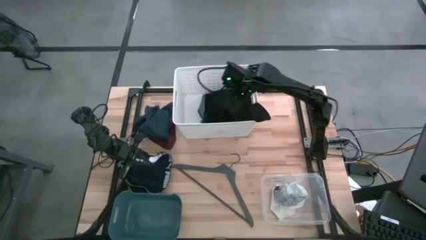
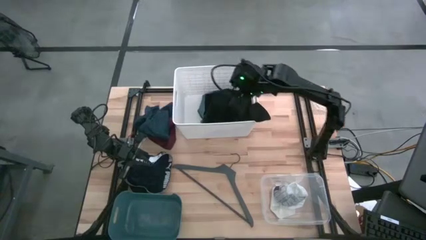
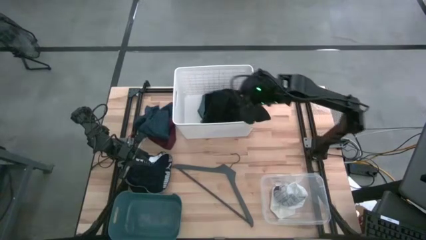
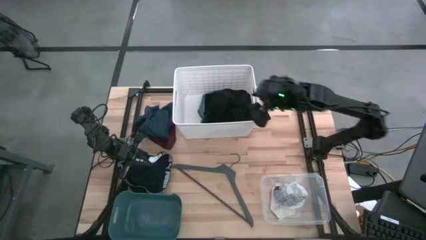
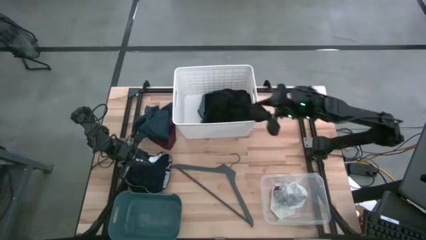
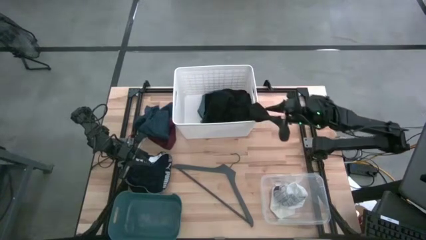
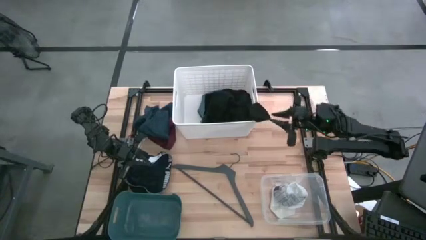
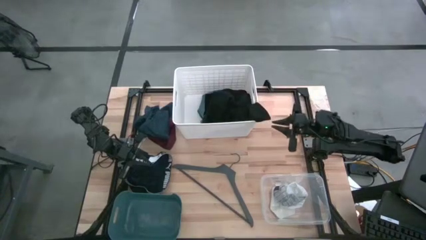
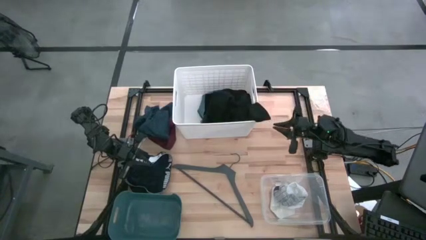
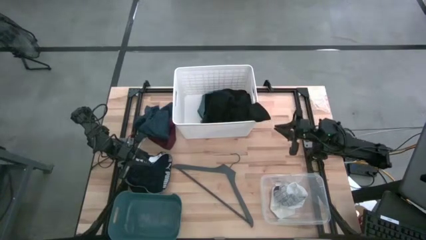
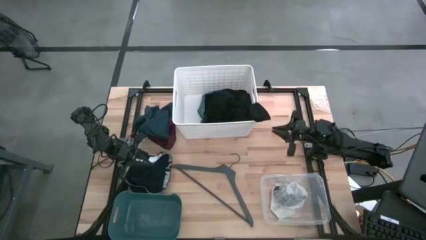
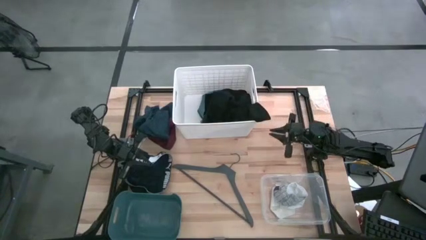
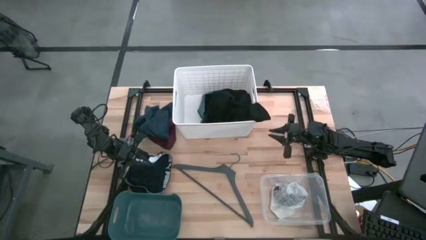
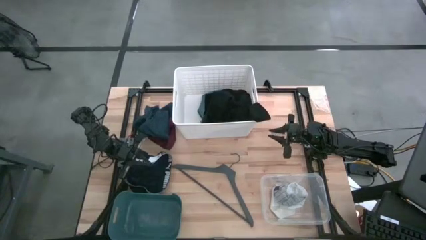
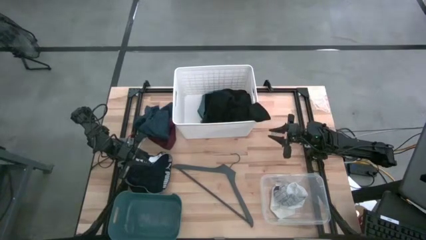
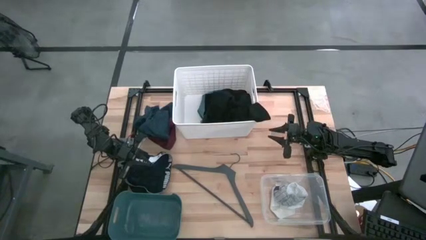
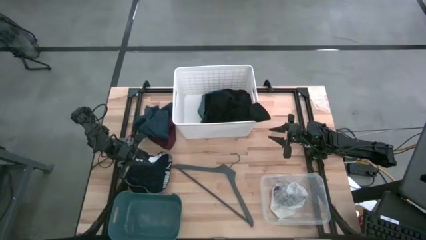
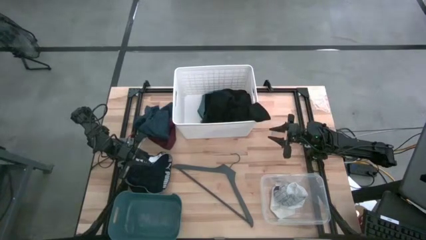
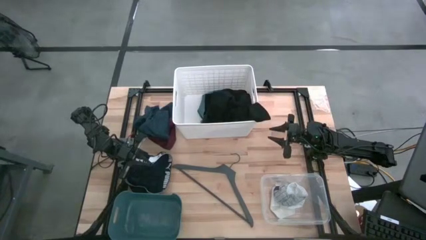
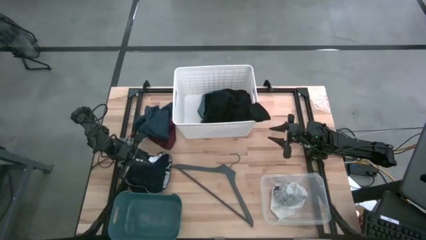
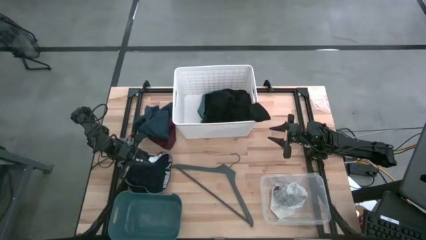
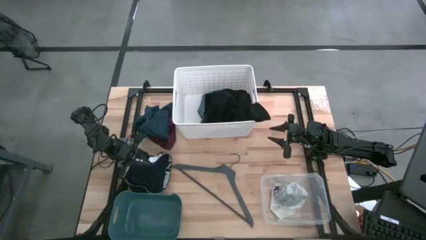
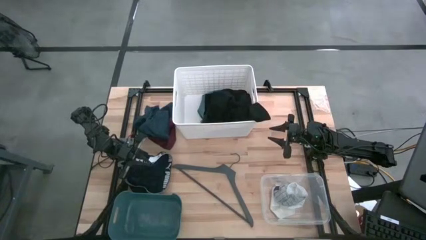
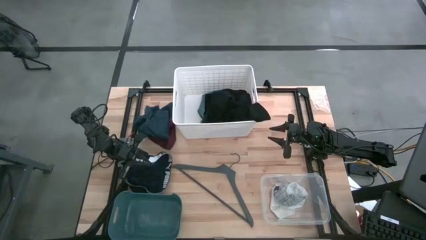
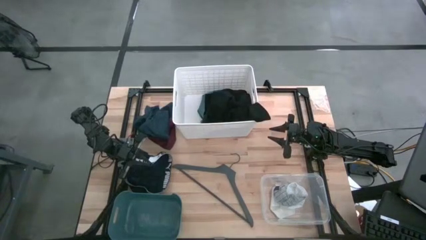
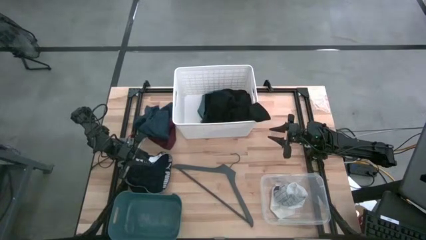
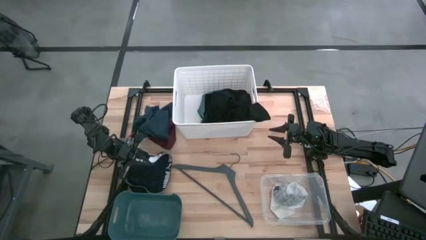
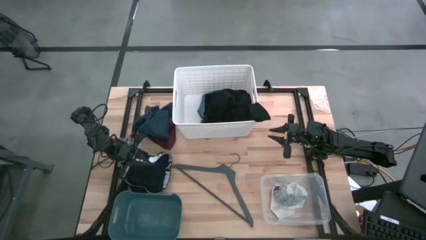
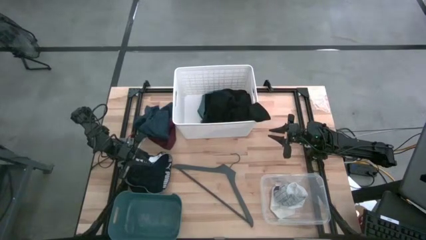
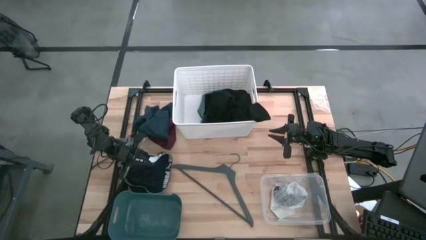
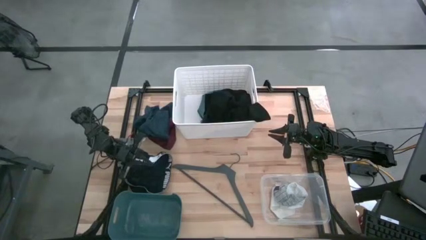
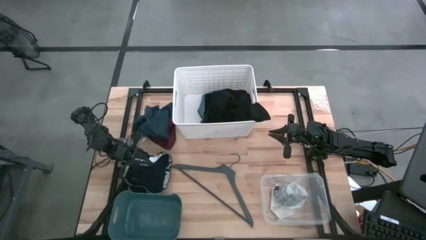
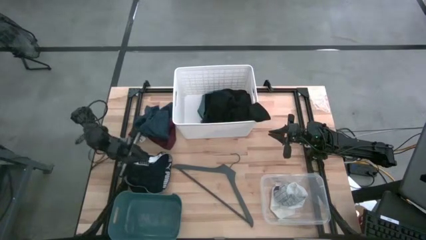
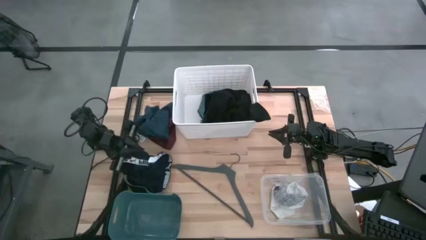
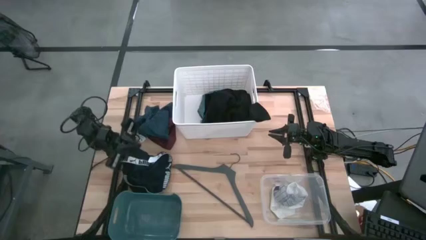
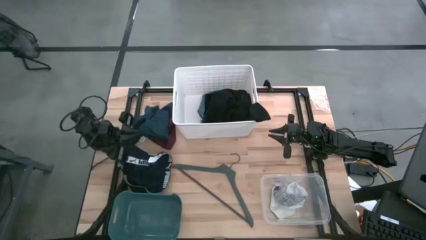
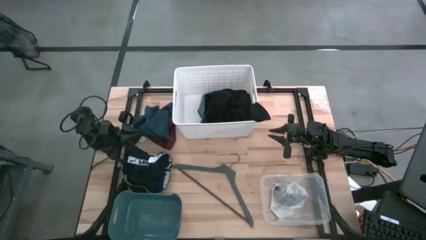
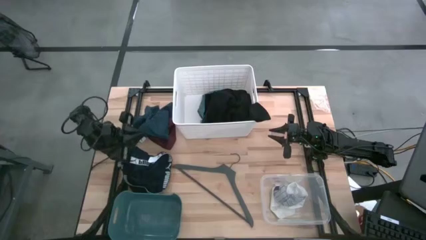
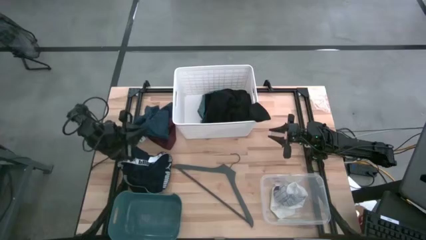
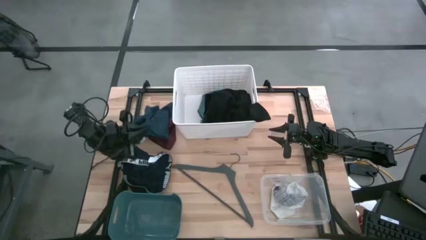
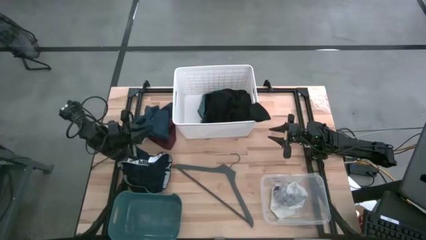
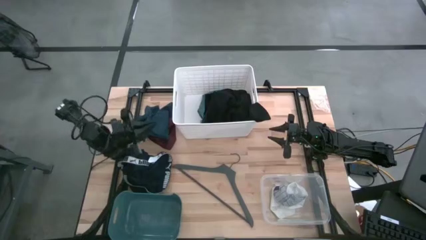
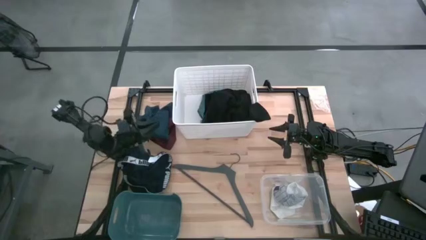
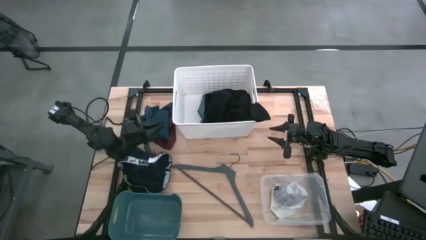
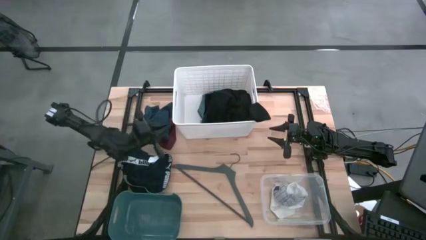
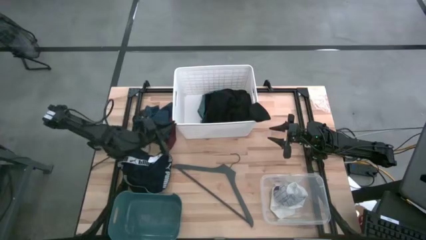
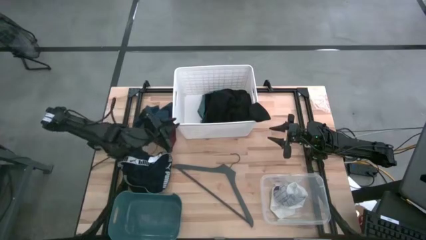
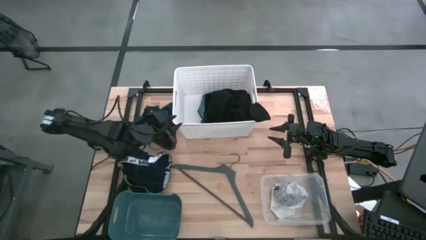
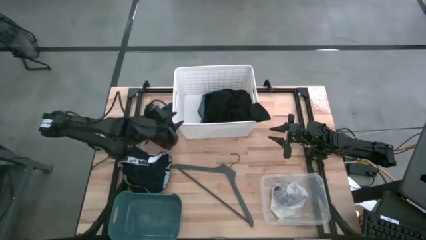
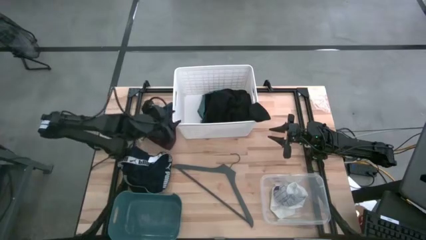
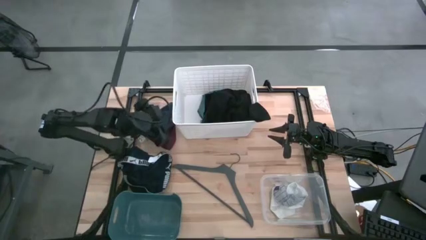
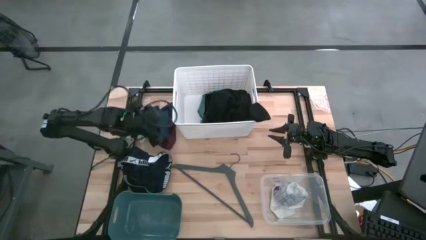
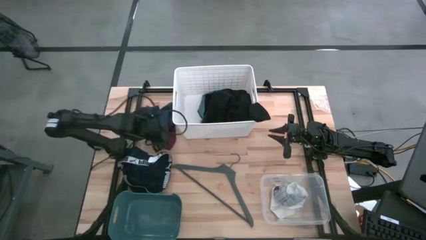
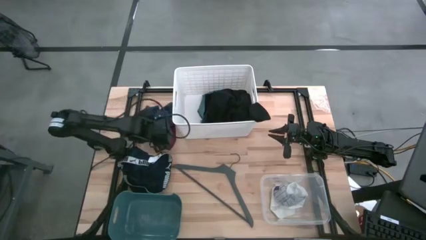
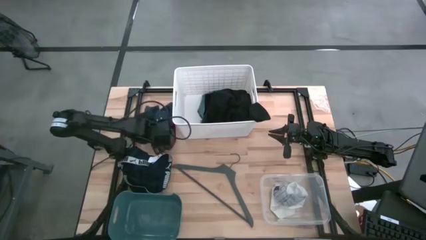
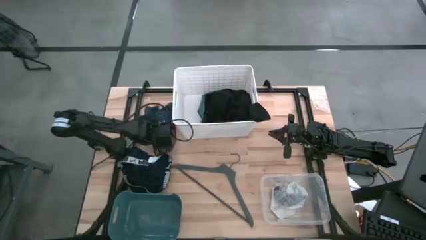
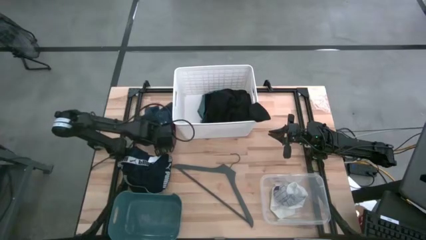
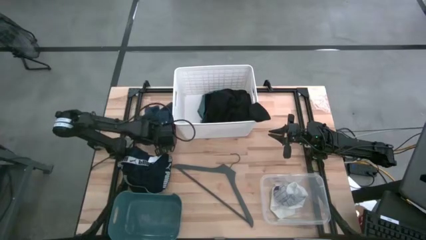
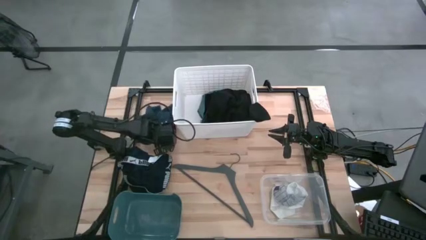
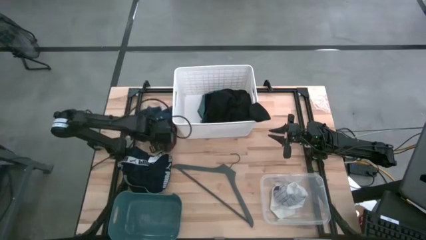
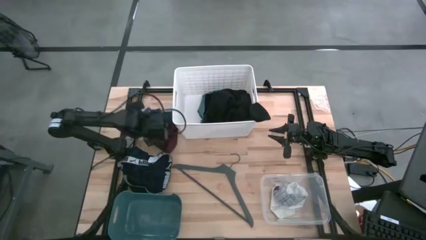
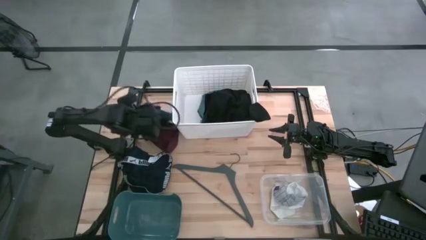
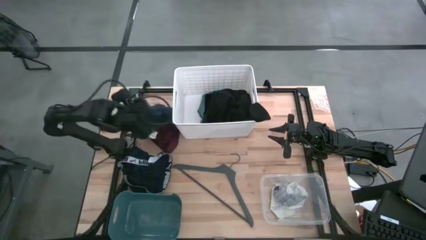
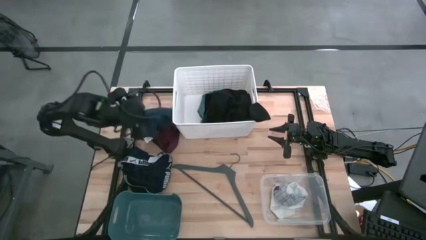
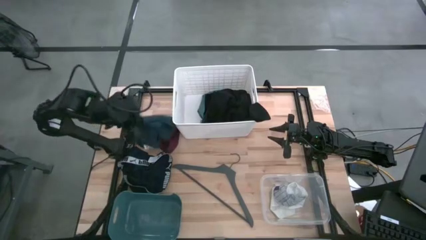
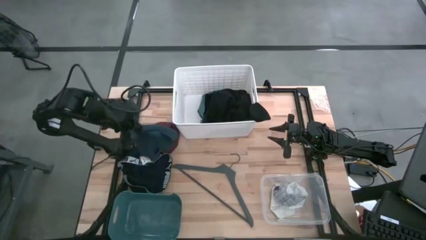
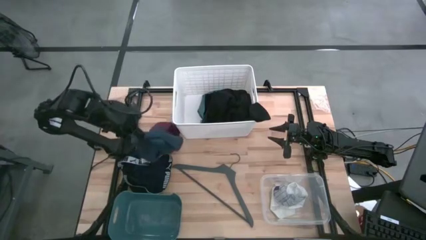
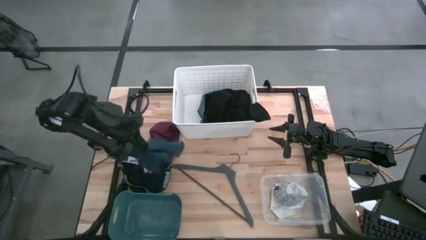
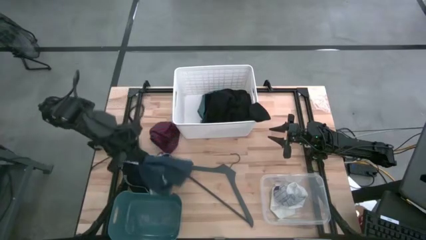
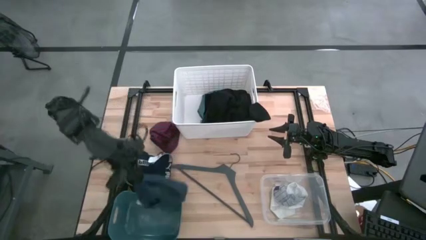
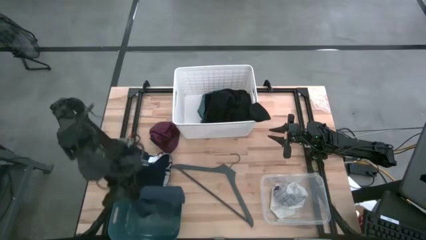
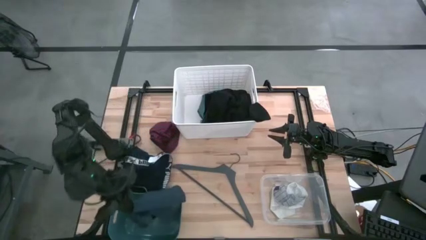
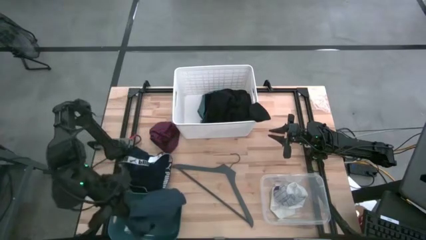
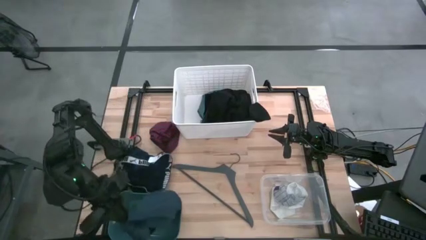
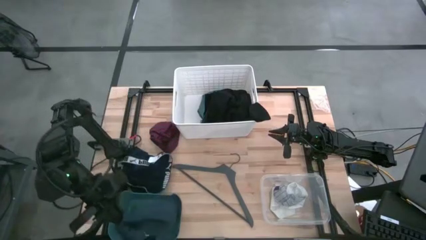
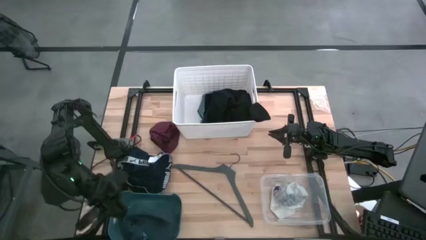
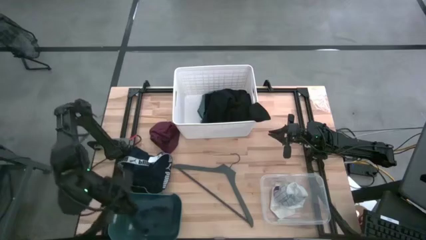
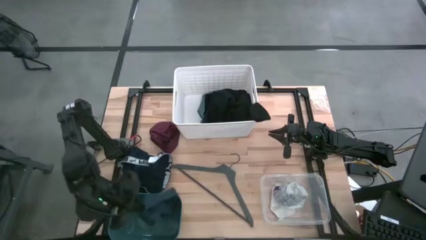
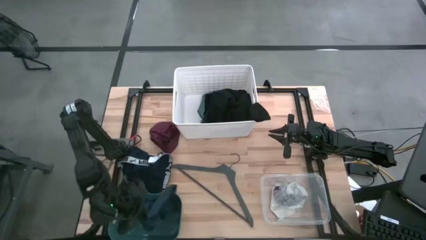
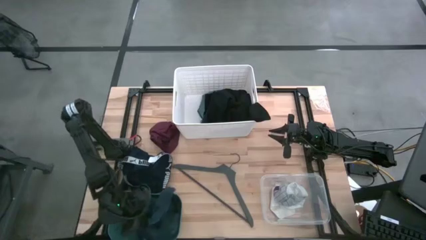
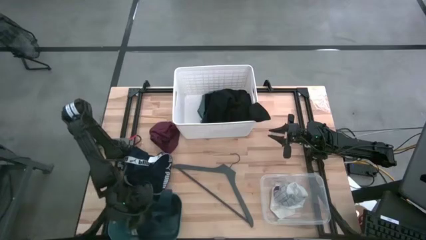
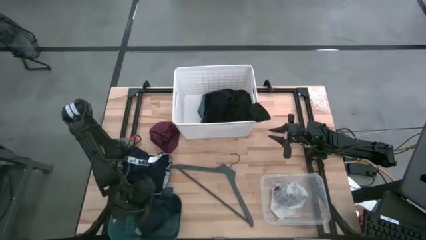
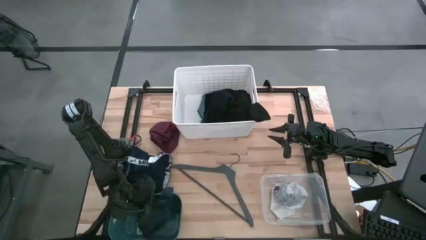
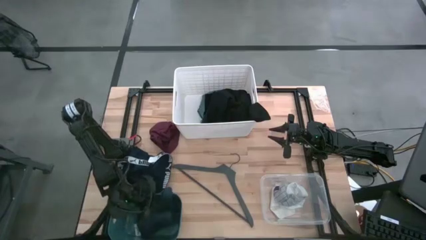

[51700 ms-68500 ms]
Task: Pick & Place Cloths
Put the dark blue shorts into the dark green bin
